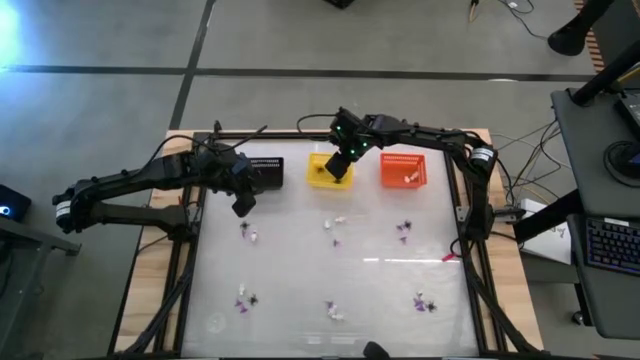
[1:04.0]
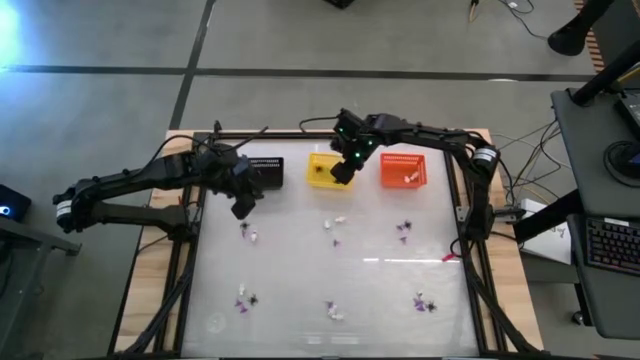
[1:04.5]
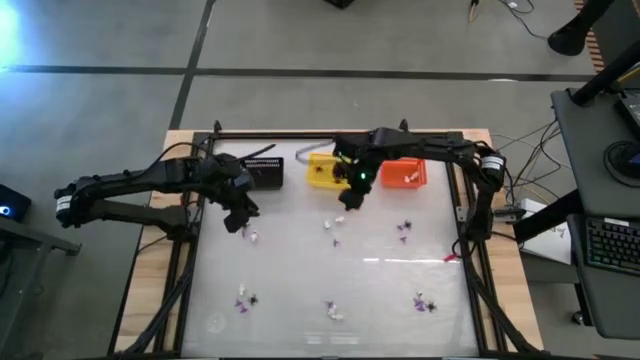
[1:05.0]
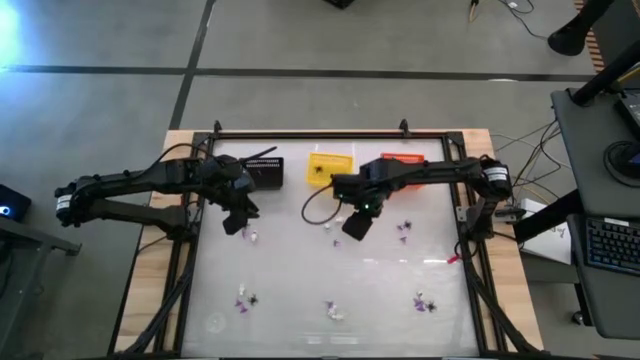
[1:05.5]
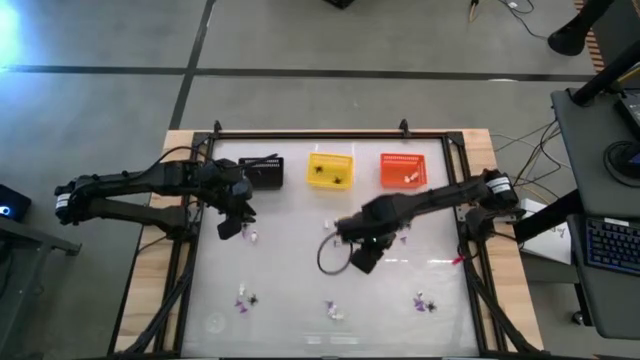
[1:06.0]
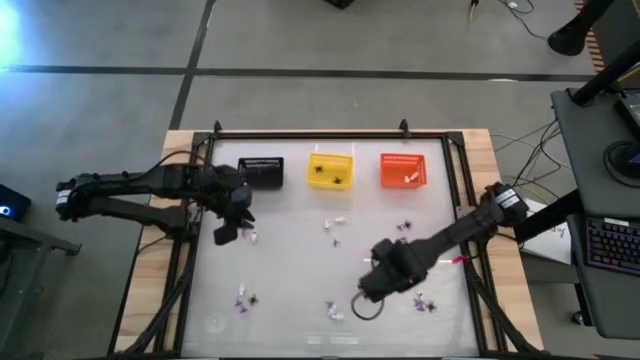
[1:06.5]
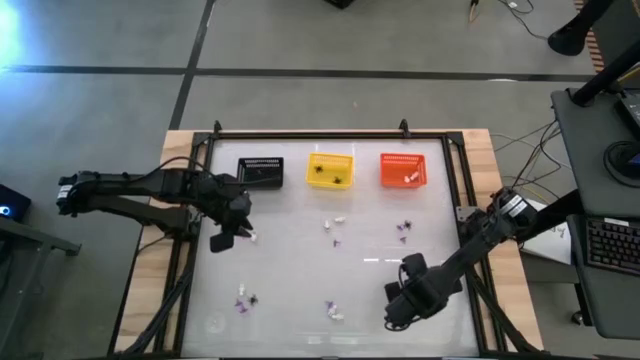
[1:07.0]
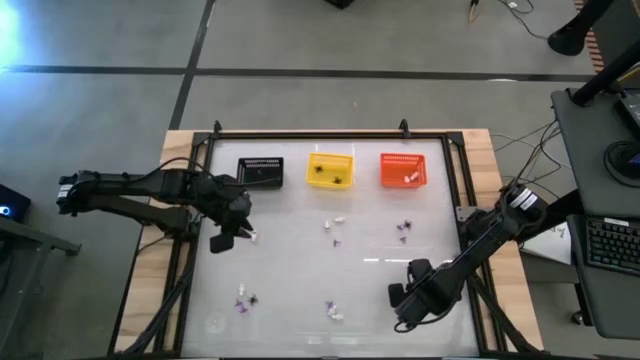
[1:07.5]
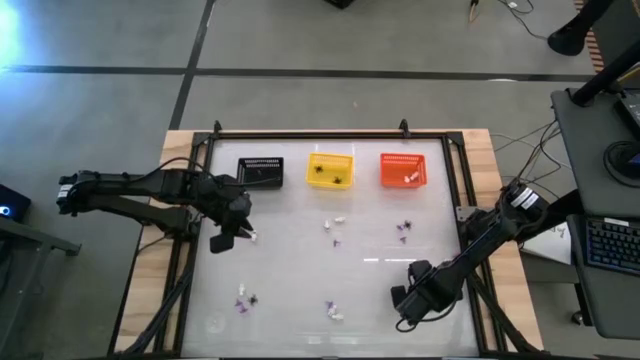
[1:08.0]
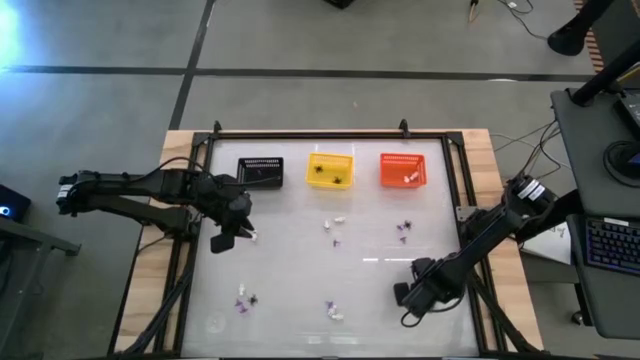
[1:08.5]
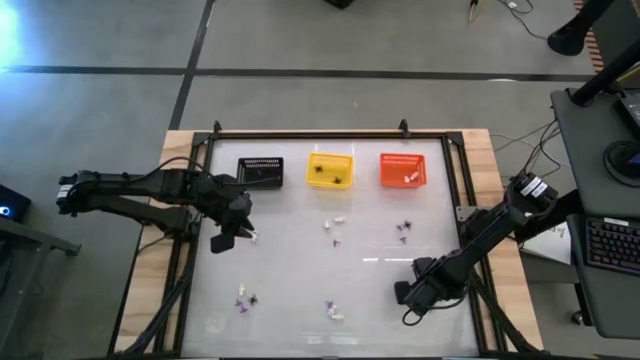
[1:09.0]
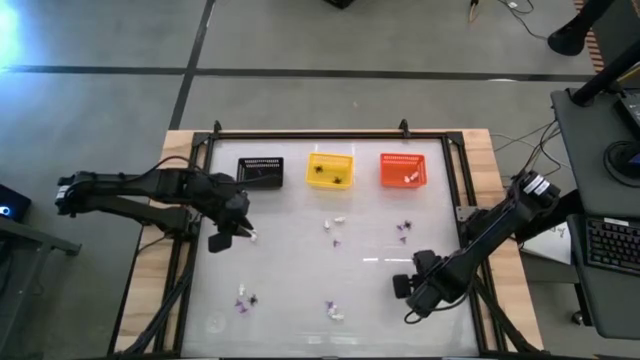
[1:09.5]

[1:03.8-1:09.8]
Task: Sort Halloween decoration
Put the white skeleton toy into the orange bin

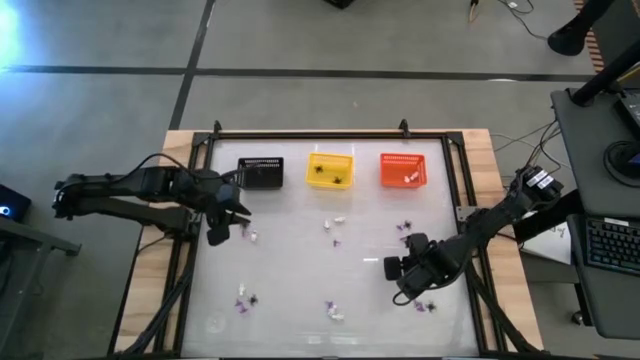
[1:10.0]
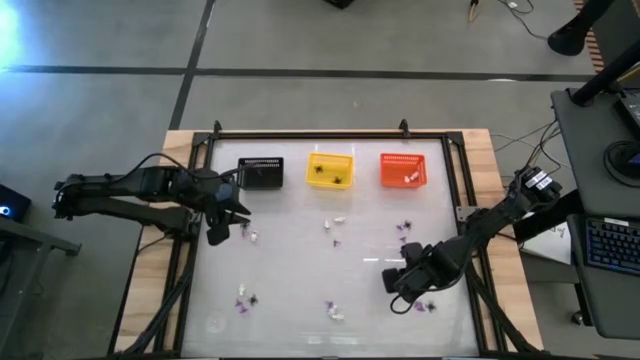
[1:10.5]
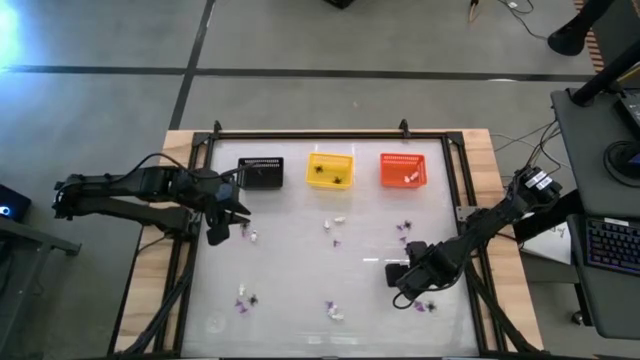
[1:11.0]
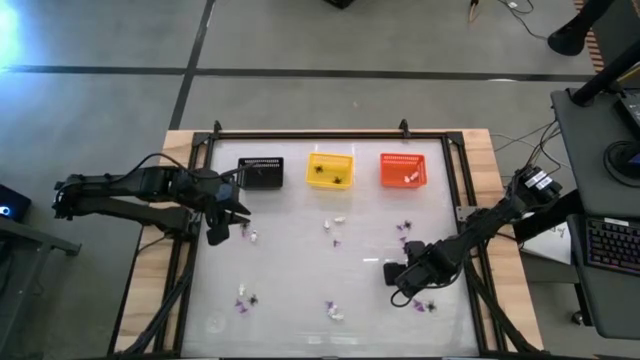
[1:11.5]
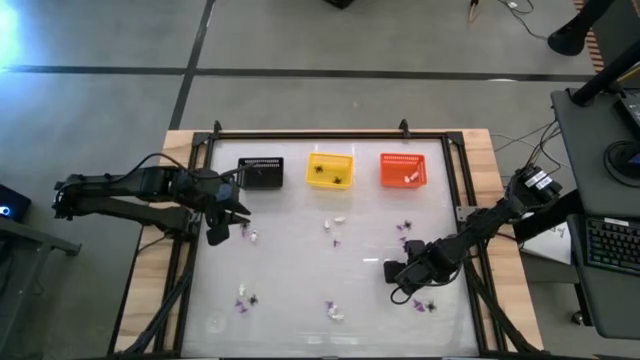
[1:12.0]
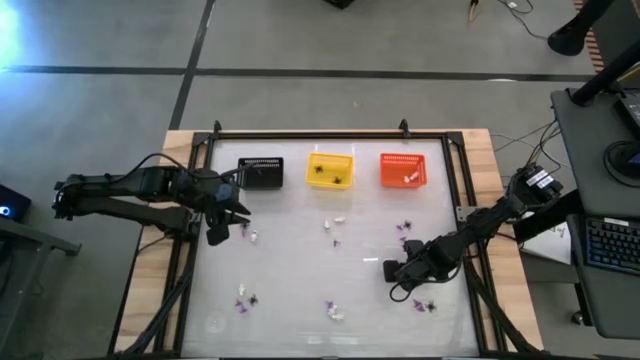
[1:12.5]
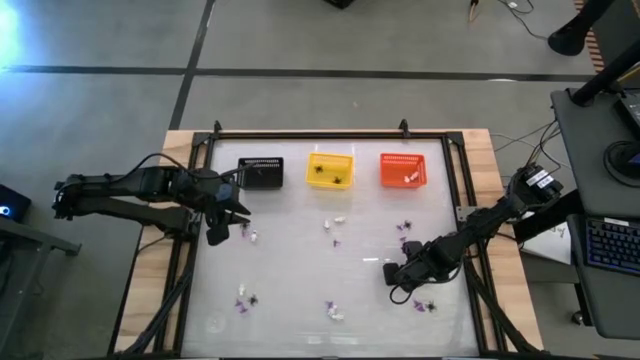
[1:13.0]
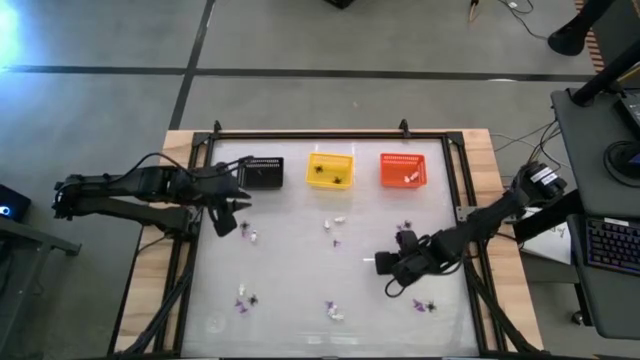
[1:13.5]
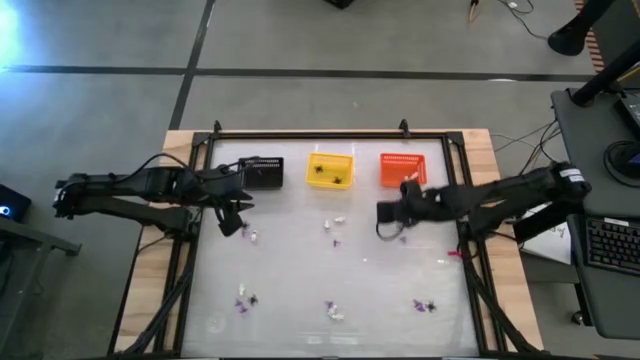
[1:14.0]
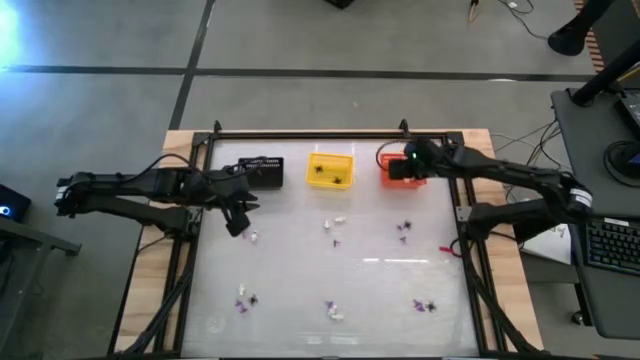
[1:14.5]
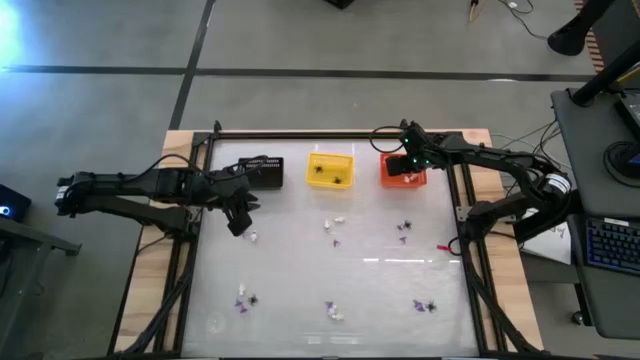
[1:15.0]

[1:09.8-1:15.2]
Put the white skeleton toy into the orange bin

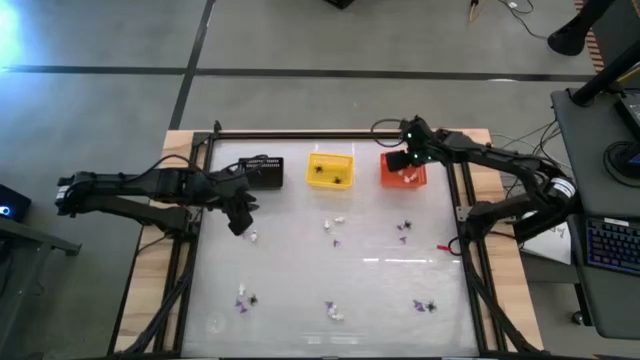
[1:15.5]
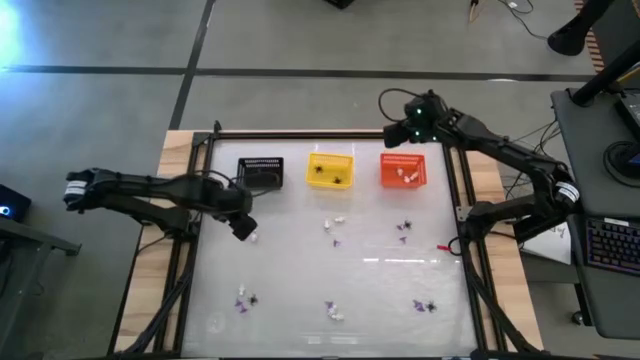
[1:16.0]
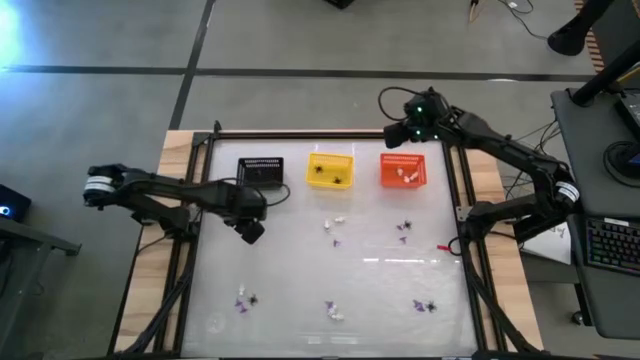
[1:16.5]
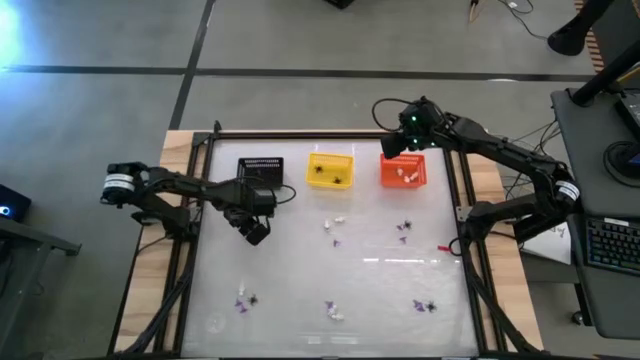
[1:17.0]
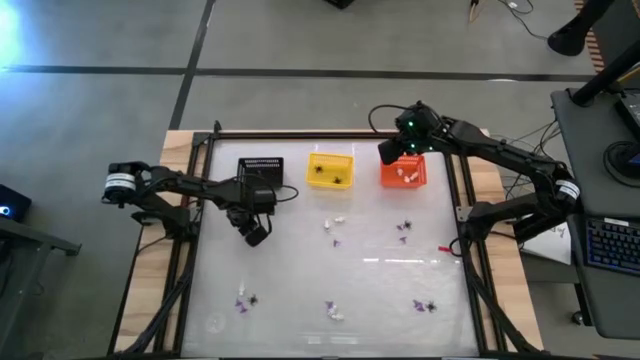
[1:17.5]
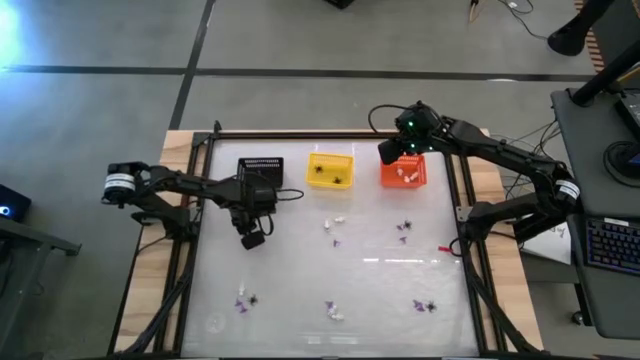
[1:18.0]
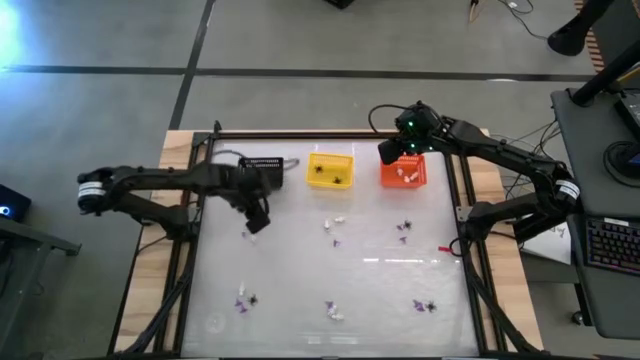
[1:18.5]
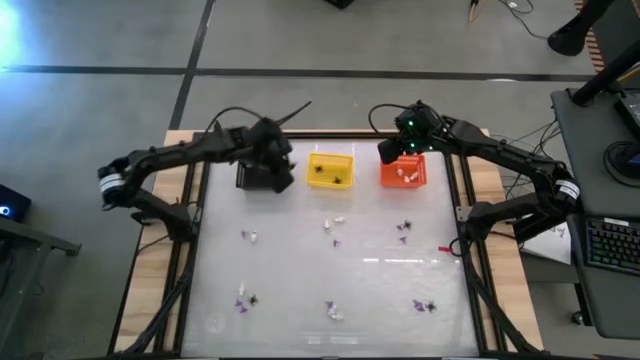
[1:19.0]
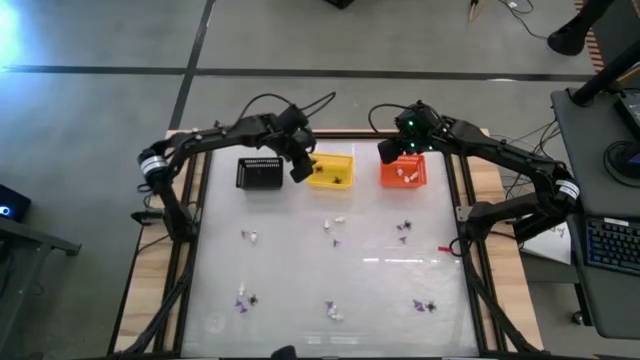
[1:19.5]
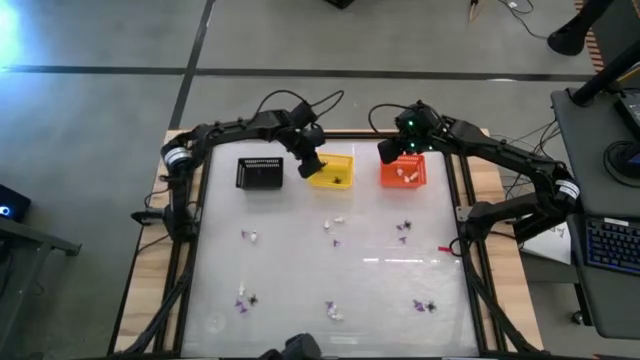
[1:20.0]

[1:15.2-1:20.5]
Put the black spider toy into the yellow bin

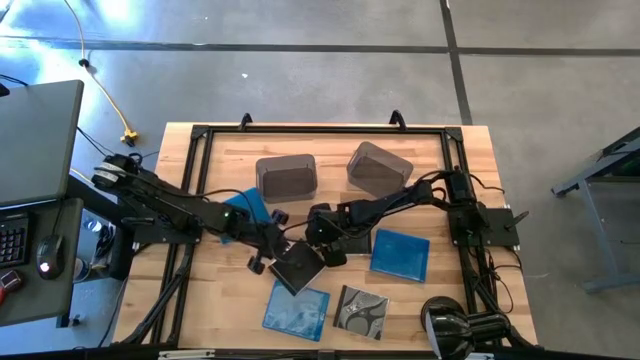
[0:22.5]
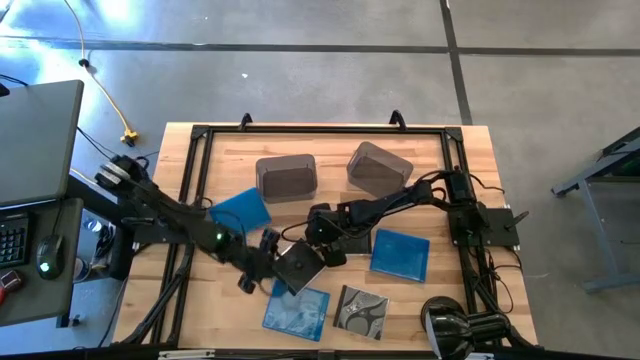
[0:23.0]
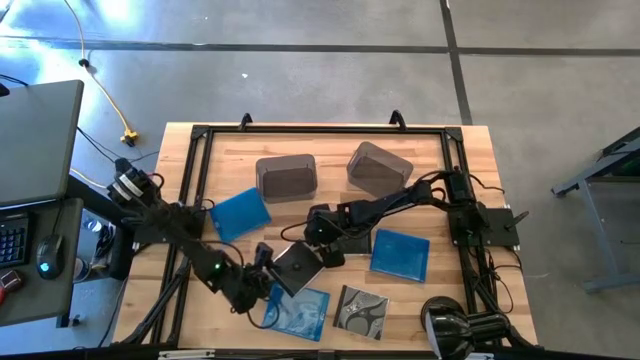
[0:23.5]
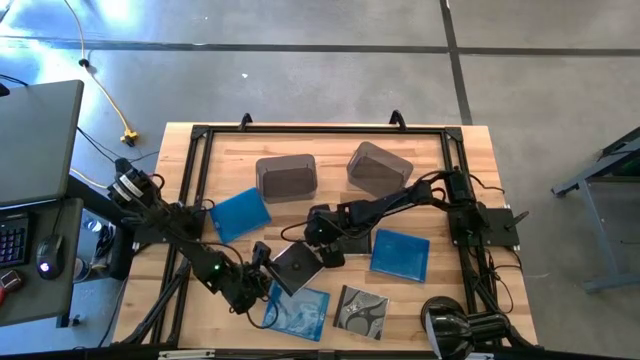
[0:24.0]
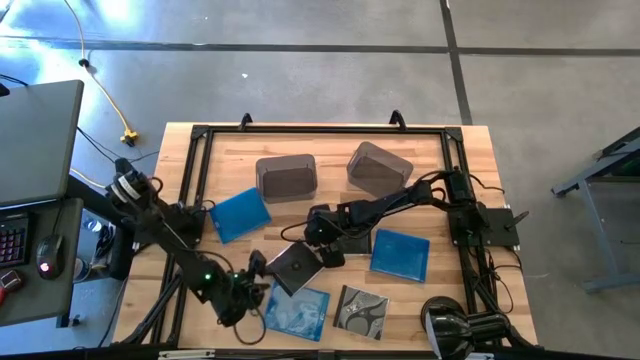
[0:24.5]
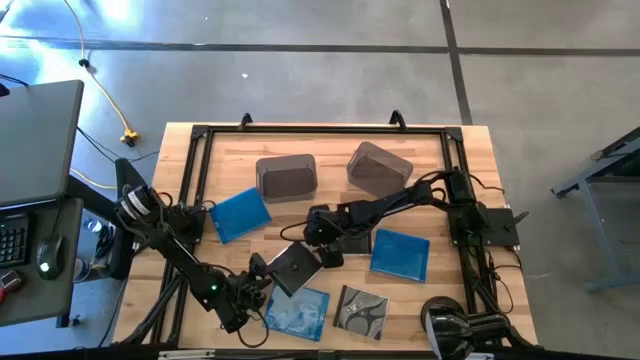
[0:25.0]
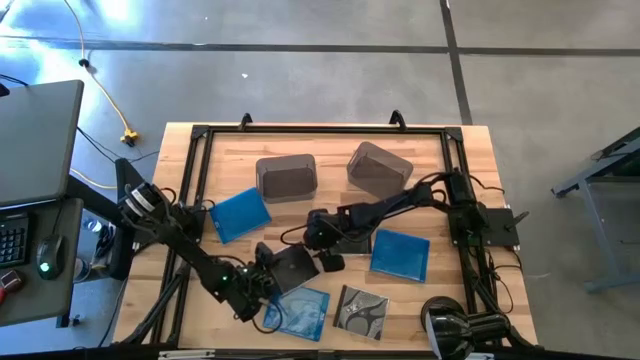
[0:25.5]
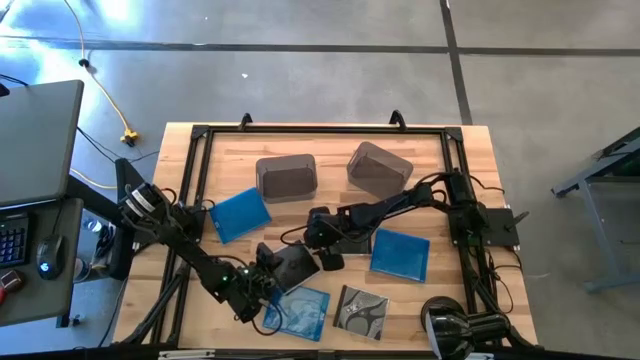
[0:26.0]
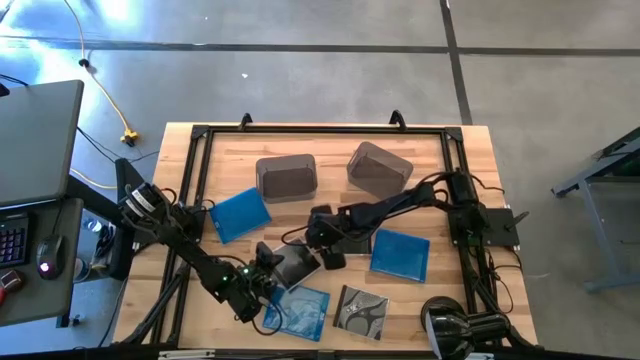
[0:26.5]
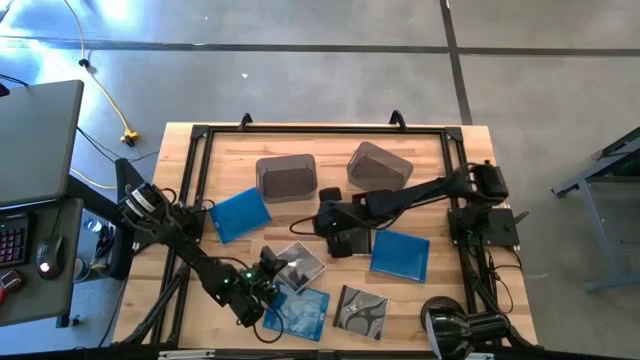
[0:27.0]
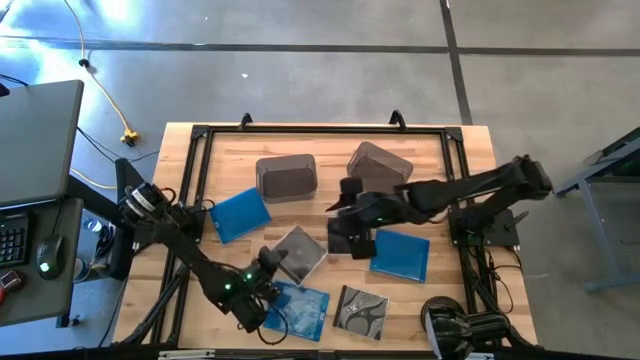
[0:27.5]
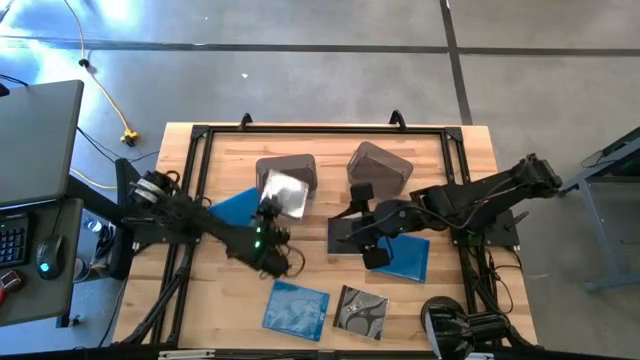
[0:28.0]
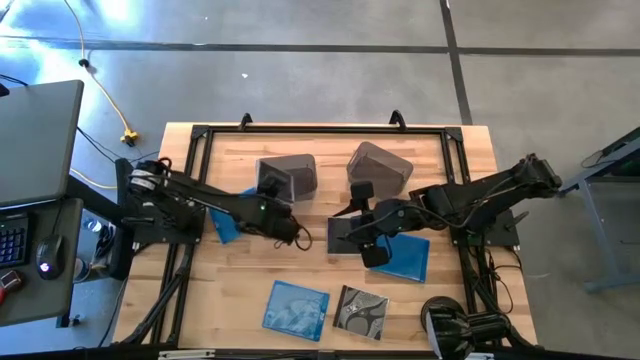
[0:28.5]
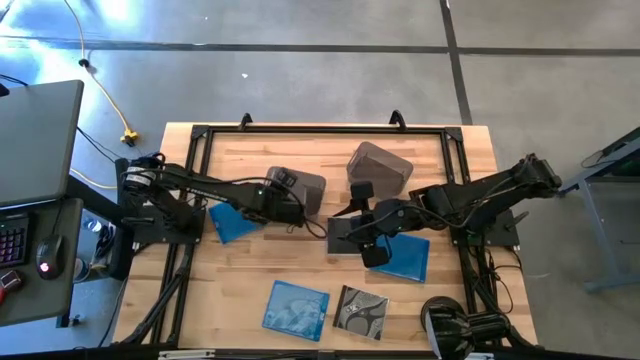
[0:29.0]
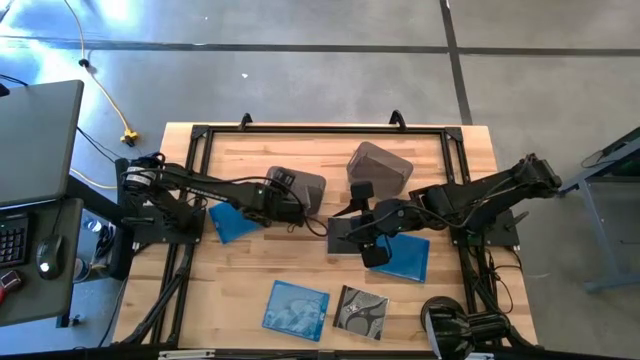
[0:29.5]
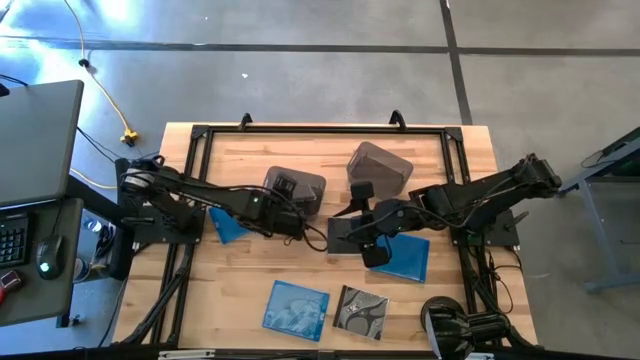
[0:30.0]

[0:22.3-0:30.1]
Task: Pick & place jewel cases by type
Put the top left black CD case into the left black bin
